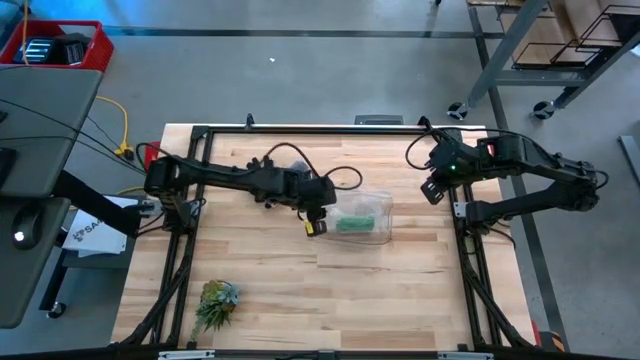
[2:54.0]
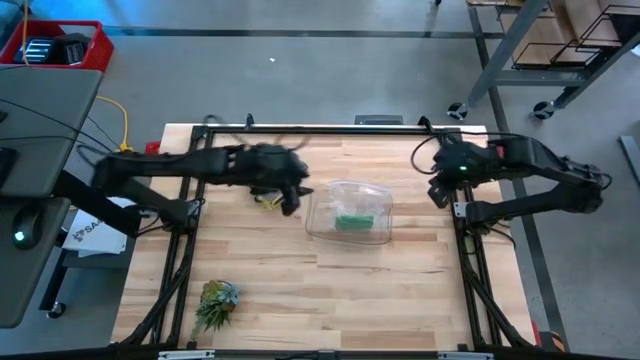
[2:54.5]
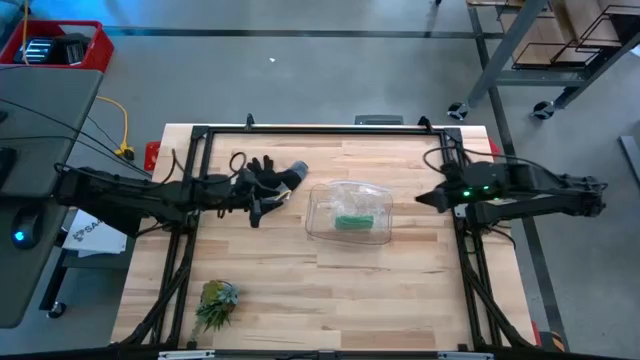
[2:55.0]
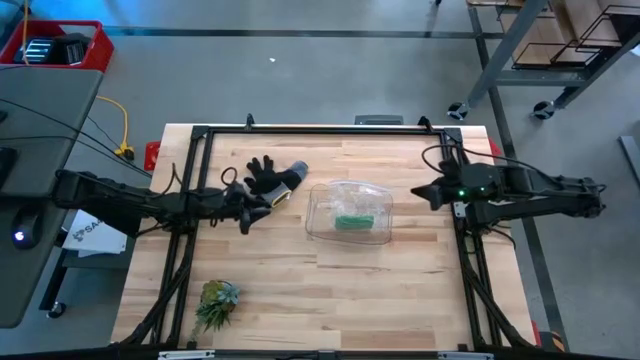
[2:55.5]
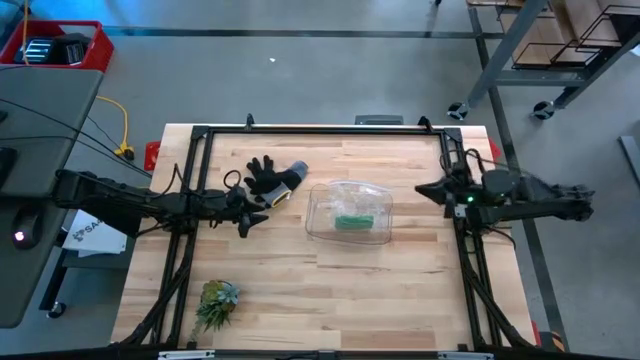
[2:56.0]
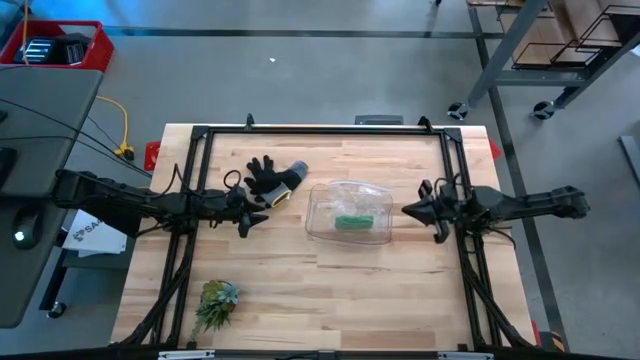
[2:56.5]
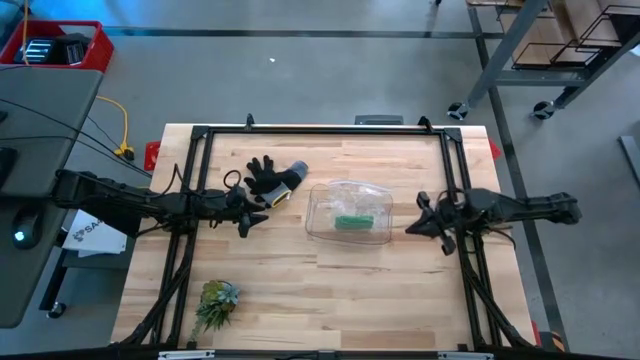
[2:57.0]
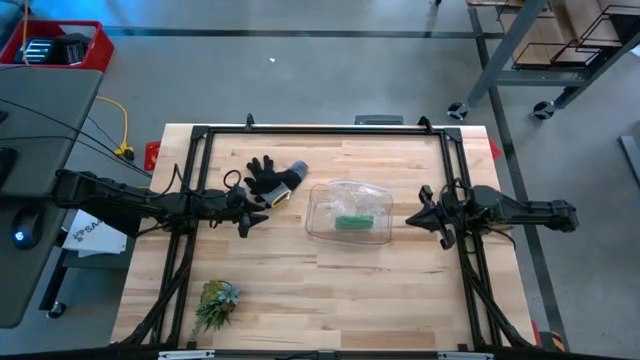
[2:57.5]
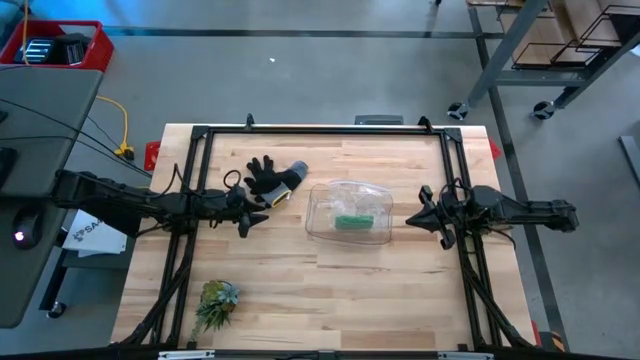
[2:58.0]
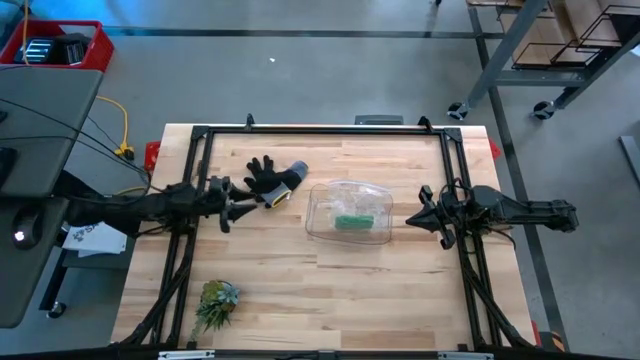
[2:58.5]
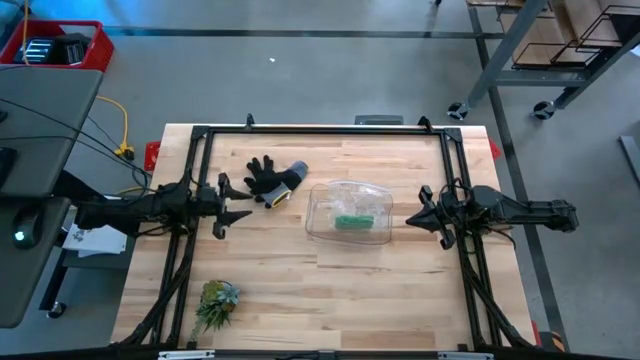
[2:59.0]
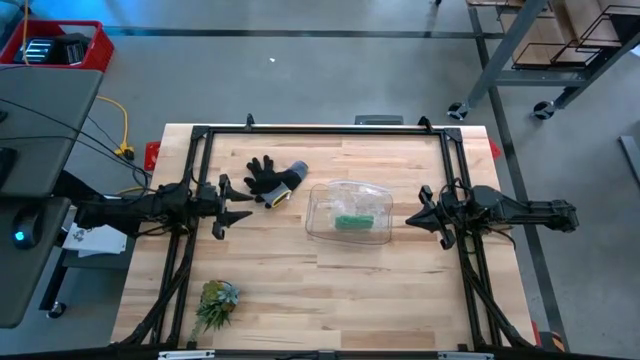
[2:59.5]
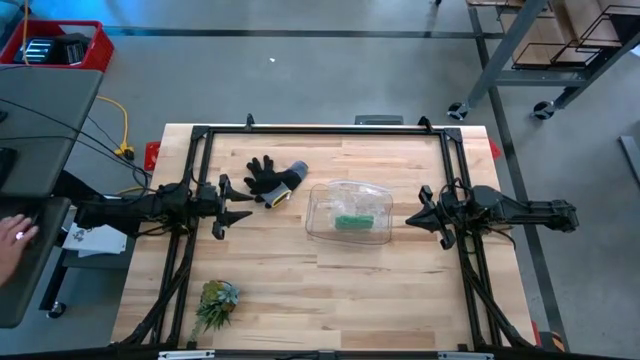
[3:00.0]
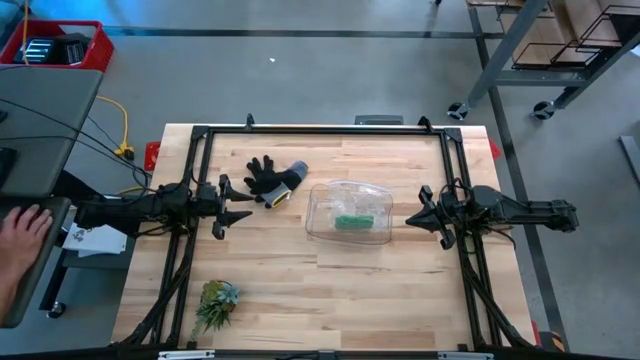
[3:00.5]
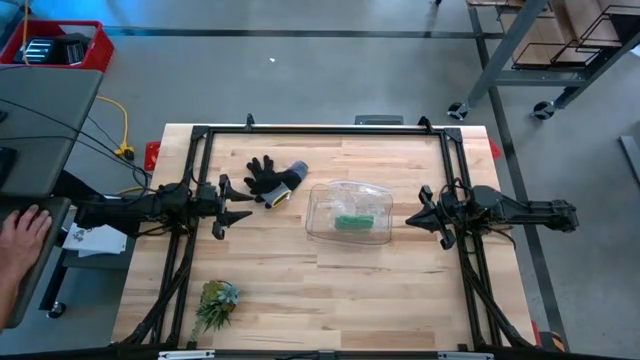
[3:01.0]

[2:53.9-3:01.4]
Task: Roll bandage
Return to Home Position

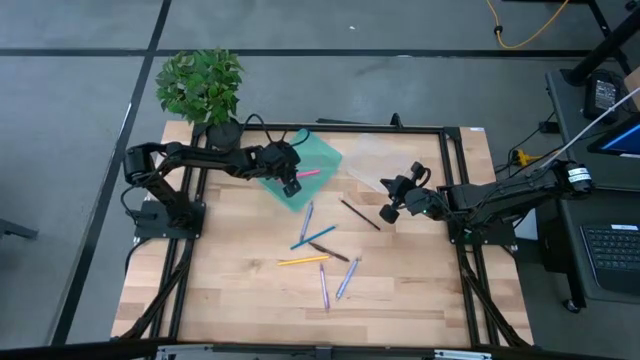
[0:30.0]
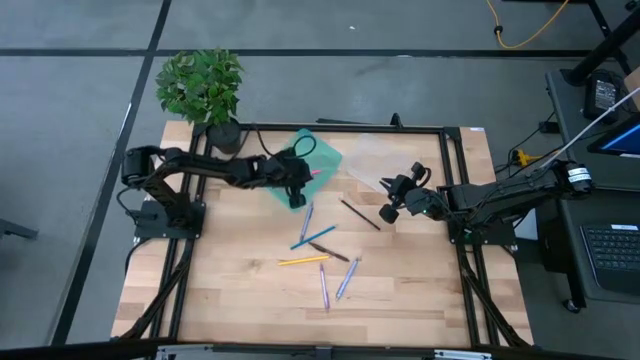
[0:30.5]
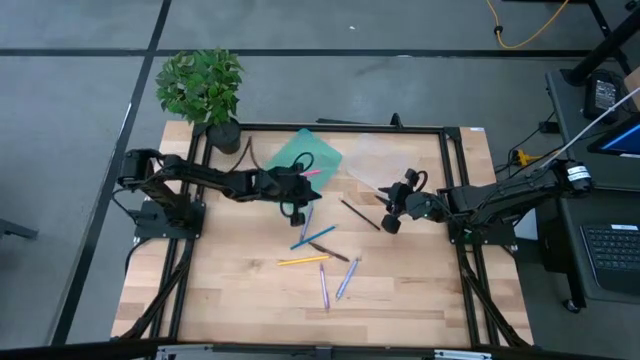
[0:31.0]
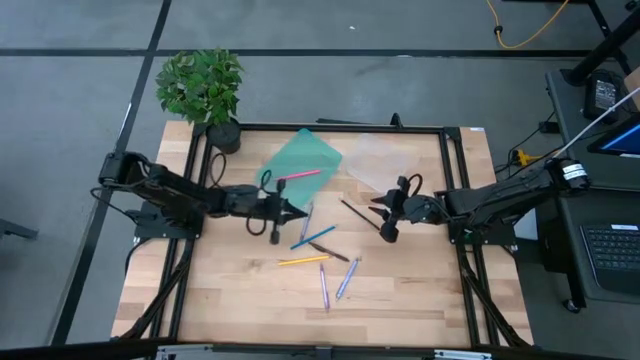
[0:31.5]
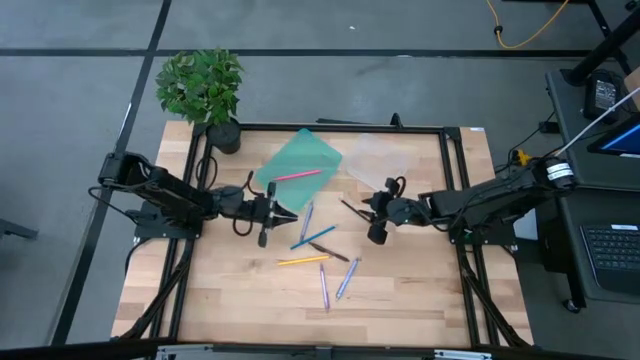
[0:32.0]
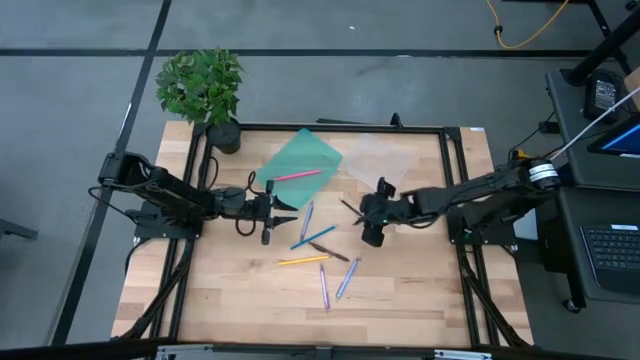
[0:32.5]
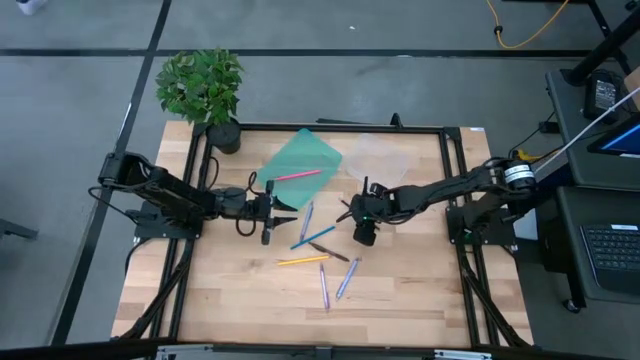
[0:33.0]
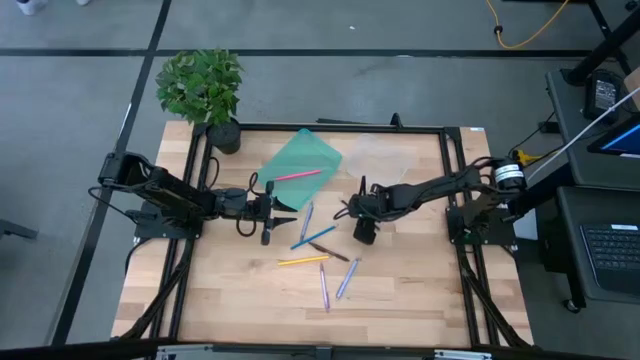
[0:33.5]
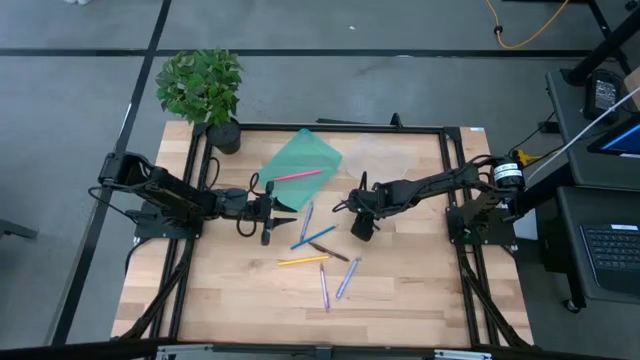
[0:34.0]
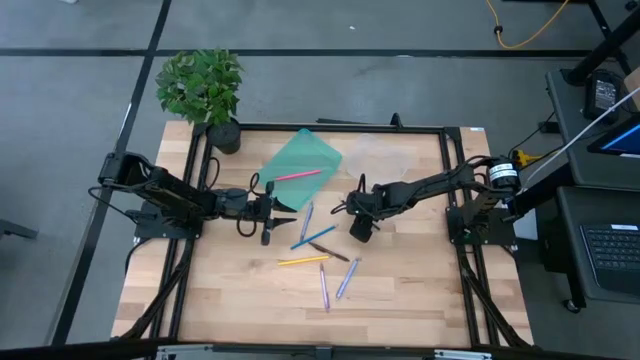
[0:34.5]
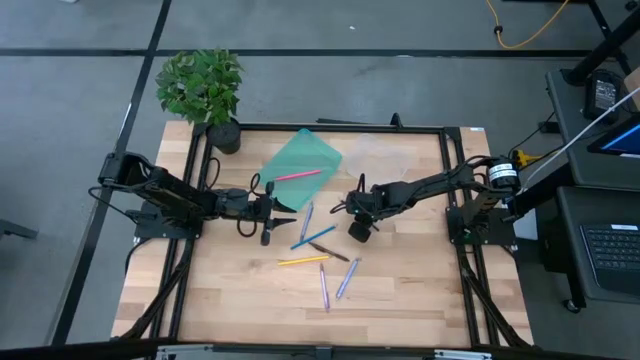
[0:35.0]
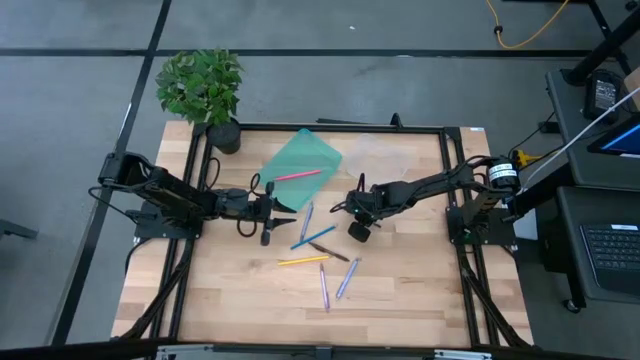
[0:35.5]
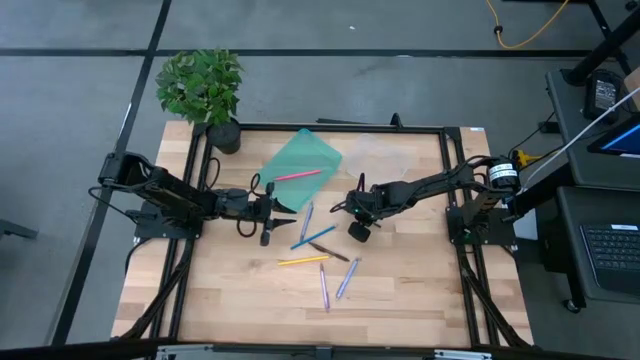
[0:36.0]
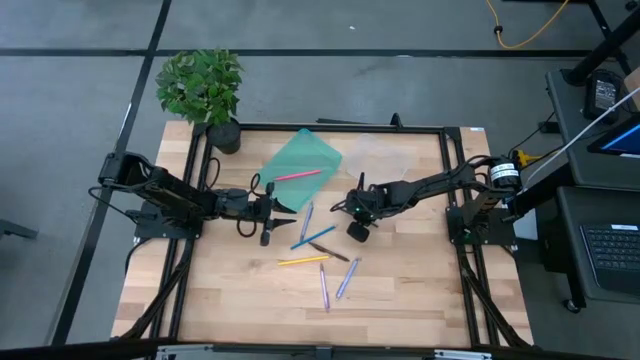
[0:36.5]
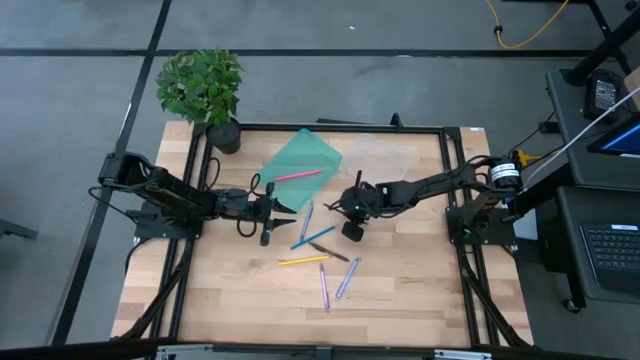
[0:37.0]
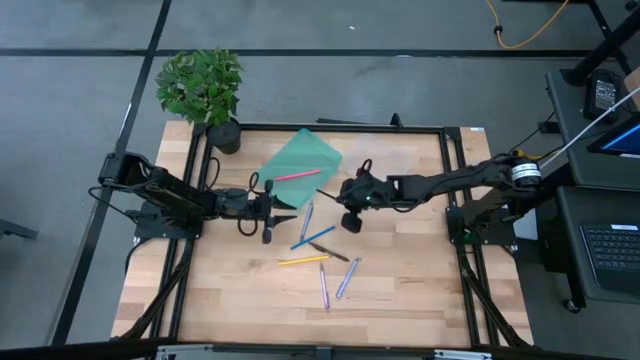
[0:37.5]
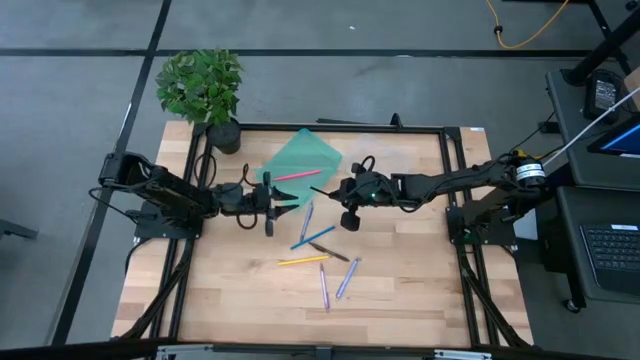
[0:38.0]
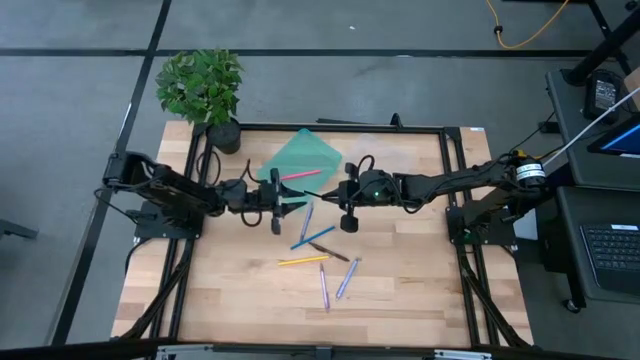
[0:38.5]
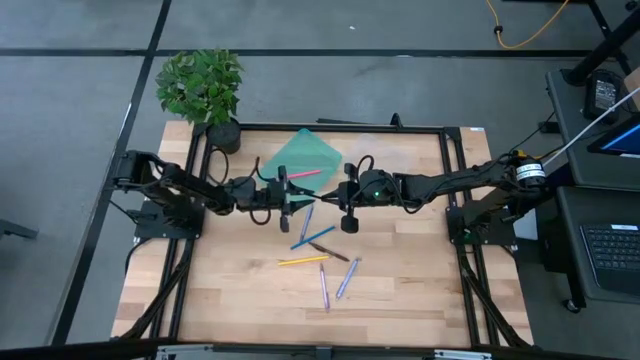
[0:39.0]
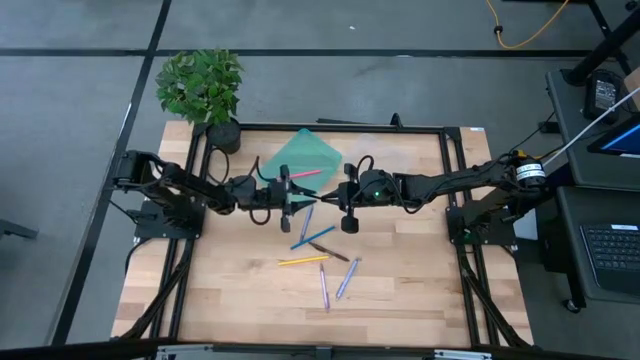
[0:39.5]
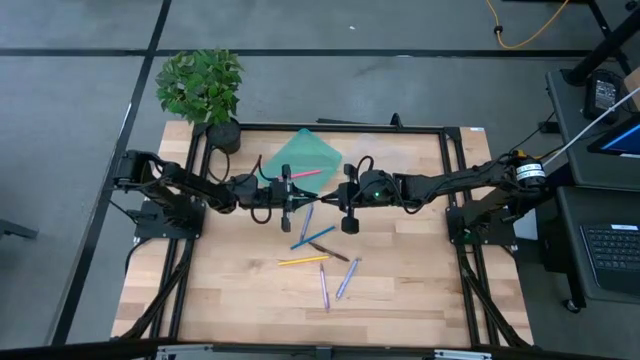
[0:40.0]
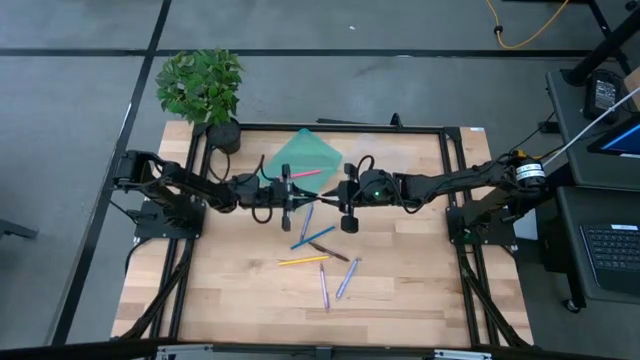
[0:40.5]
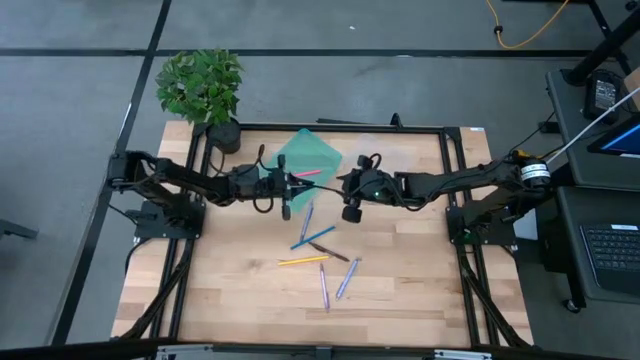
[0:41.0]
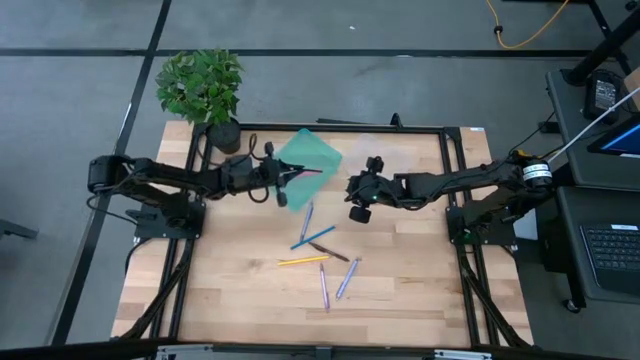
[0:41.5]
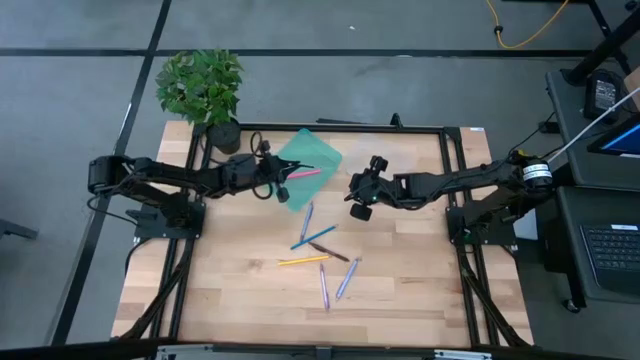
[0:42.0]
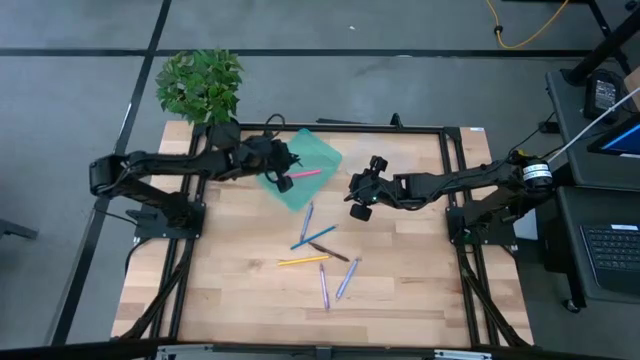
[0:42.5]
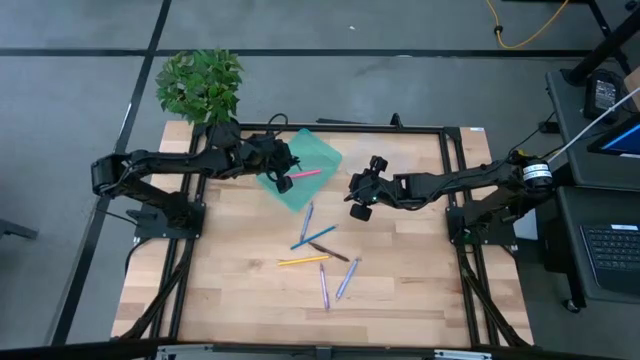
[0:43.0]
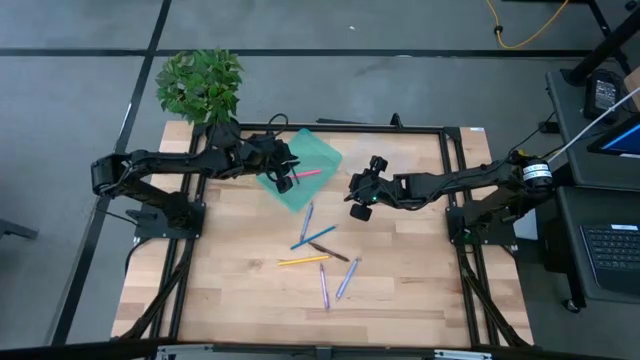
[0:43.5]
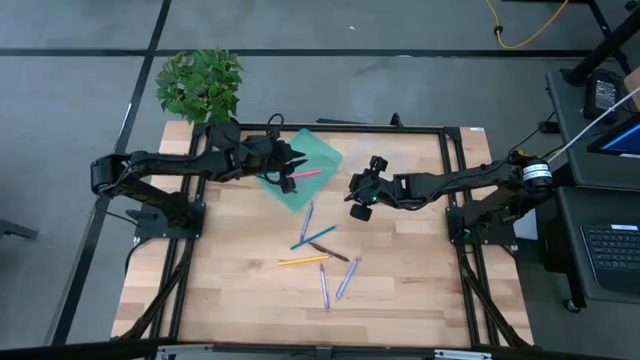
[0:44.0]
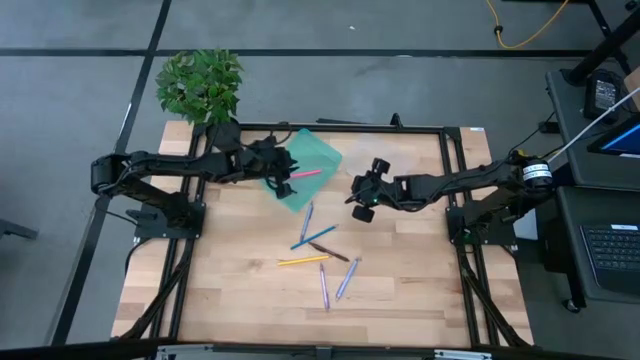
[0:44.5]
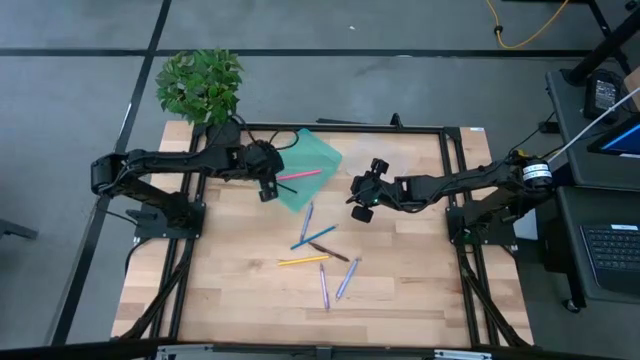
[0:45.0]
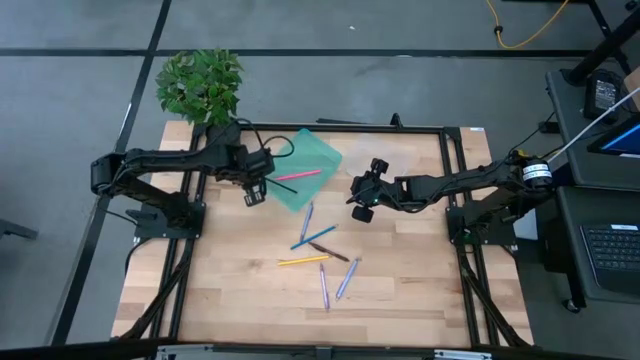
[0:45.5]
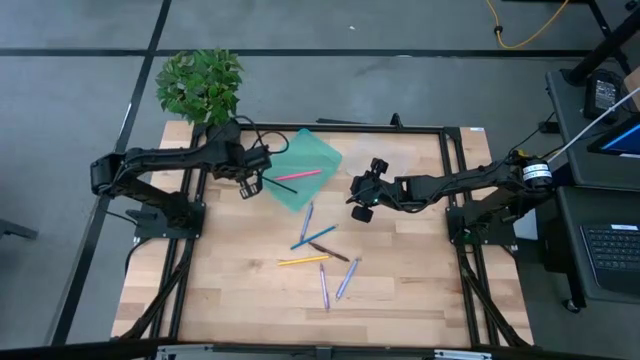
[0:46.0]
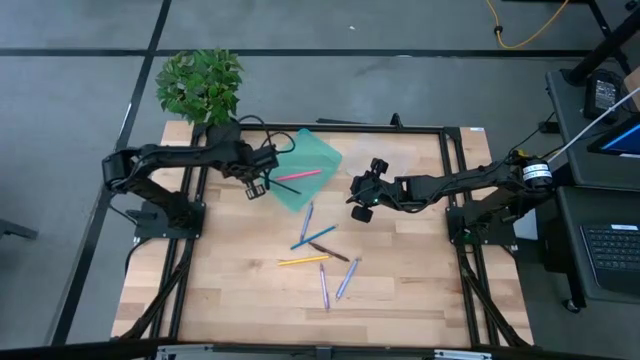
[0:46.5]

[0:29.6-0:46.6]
Task: Sort pens & pencils
Put the black pencil into the blue bin
